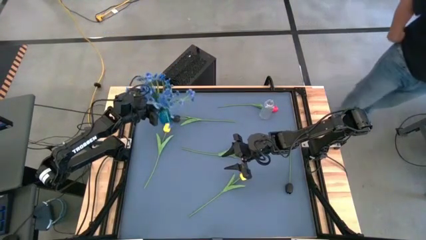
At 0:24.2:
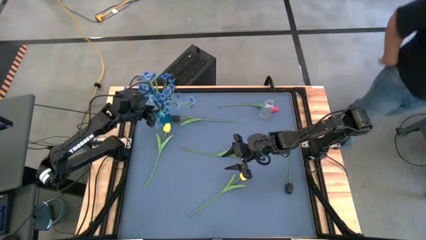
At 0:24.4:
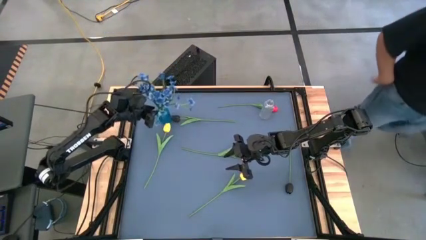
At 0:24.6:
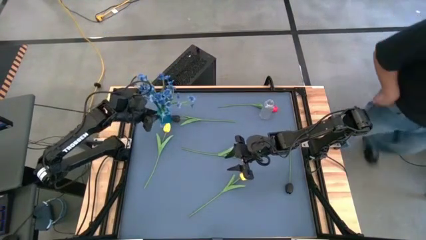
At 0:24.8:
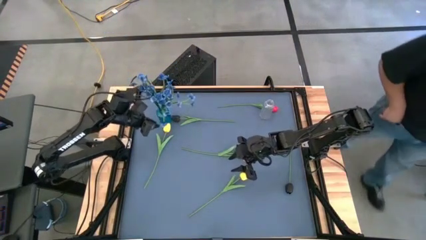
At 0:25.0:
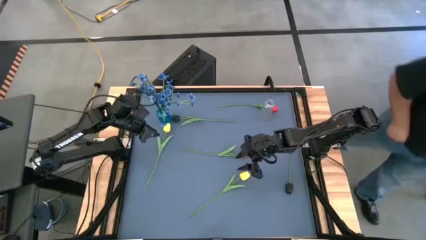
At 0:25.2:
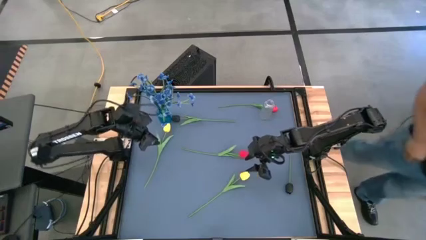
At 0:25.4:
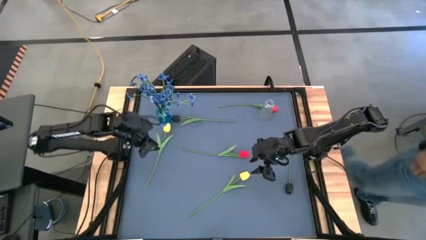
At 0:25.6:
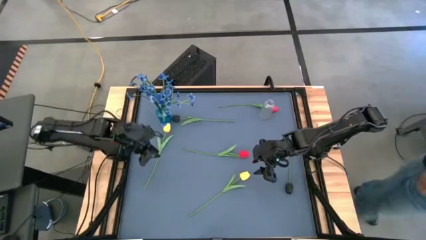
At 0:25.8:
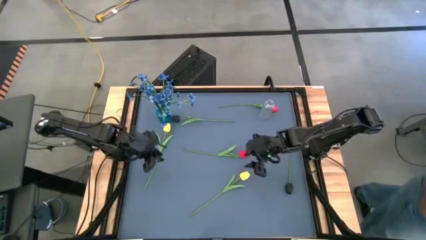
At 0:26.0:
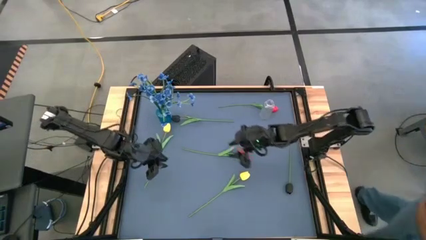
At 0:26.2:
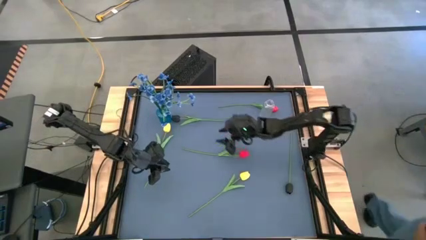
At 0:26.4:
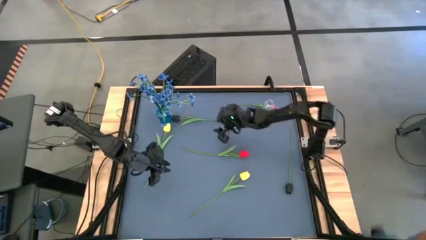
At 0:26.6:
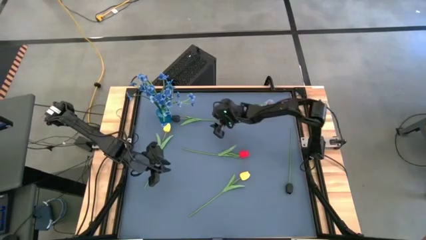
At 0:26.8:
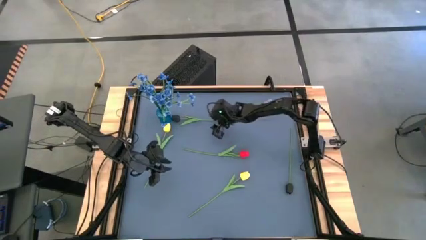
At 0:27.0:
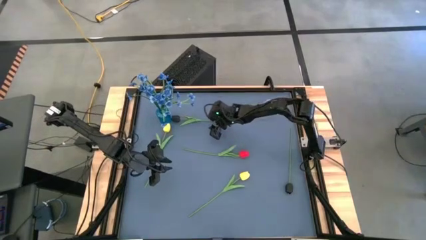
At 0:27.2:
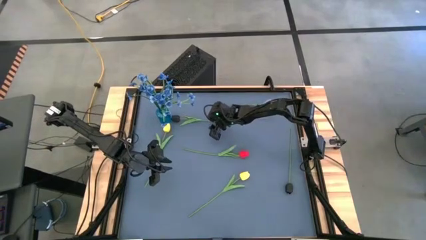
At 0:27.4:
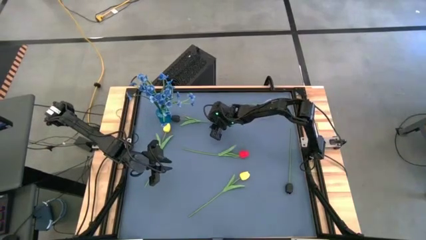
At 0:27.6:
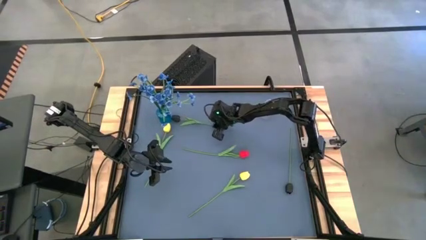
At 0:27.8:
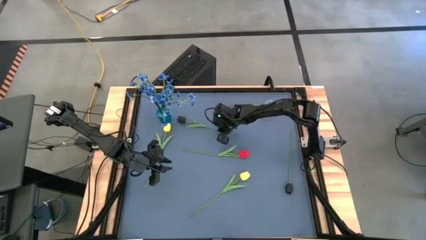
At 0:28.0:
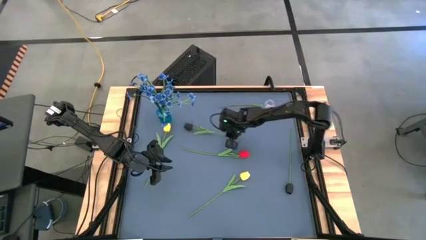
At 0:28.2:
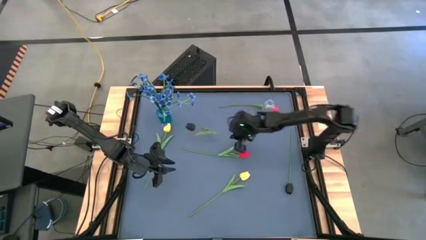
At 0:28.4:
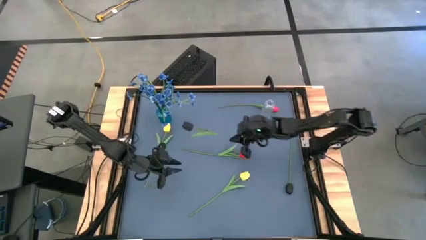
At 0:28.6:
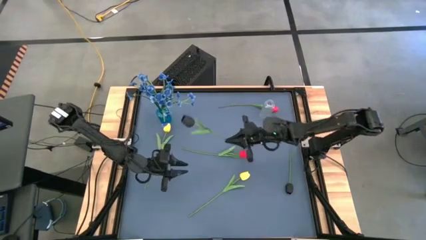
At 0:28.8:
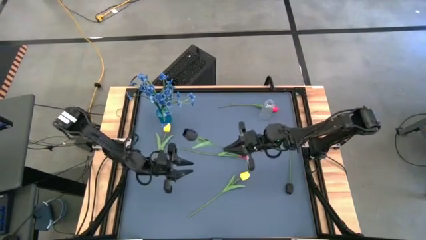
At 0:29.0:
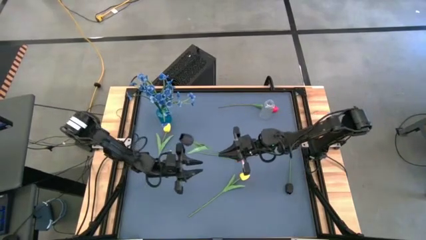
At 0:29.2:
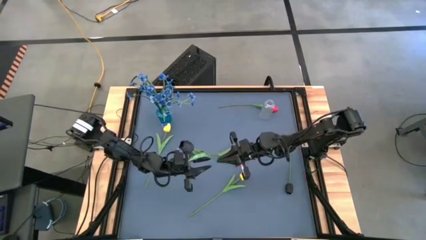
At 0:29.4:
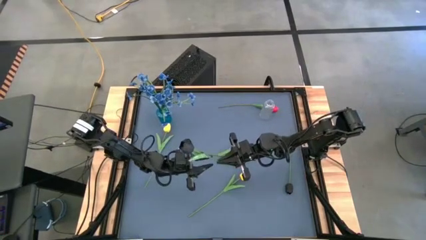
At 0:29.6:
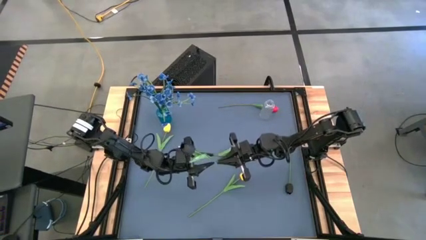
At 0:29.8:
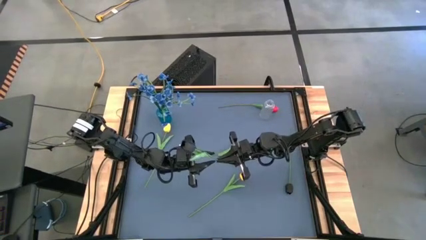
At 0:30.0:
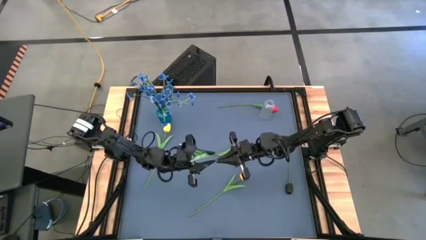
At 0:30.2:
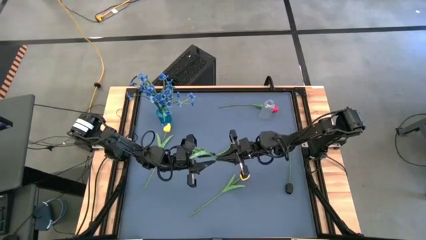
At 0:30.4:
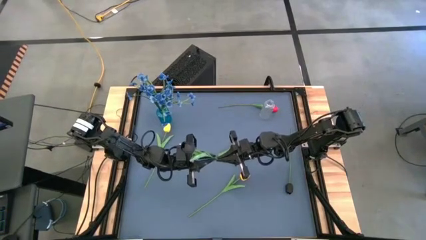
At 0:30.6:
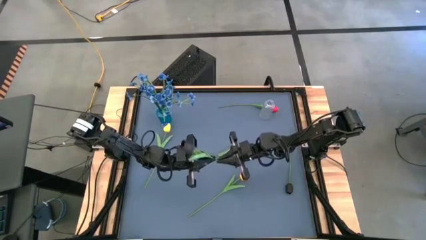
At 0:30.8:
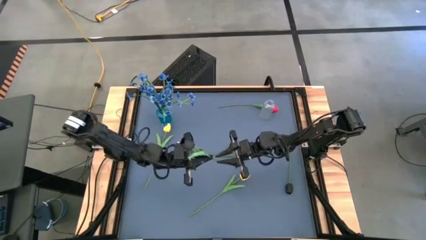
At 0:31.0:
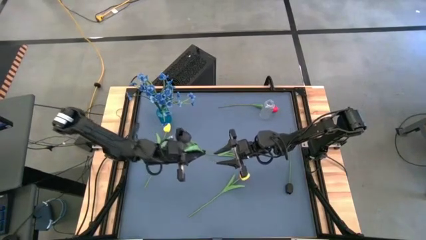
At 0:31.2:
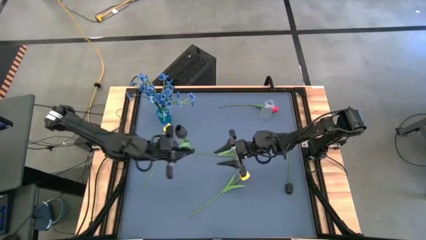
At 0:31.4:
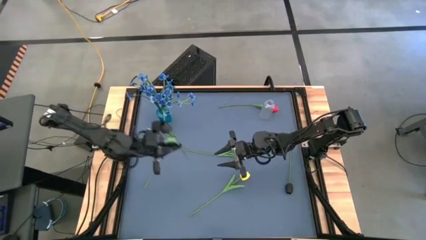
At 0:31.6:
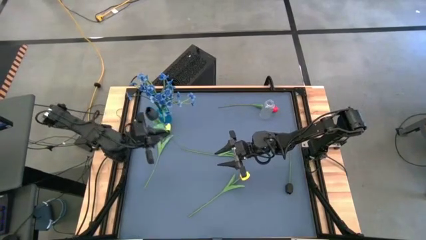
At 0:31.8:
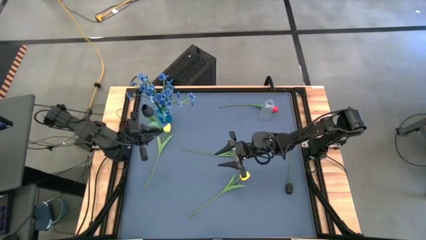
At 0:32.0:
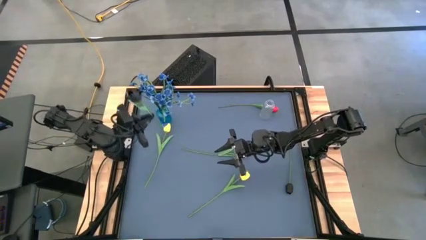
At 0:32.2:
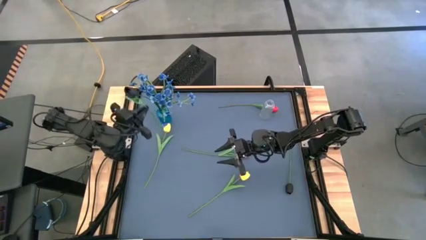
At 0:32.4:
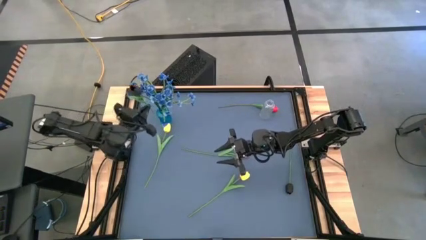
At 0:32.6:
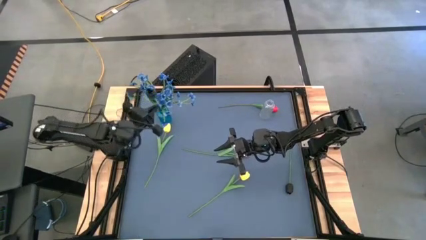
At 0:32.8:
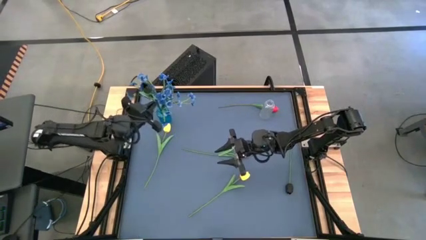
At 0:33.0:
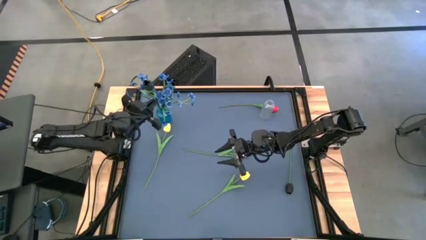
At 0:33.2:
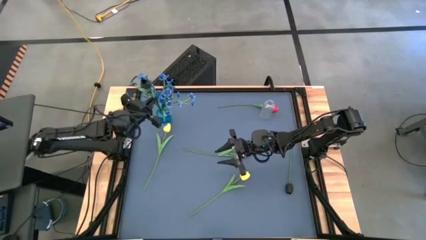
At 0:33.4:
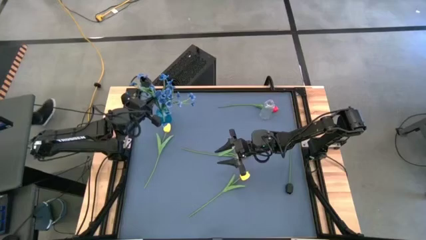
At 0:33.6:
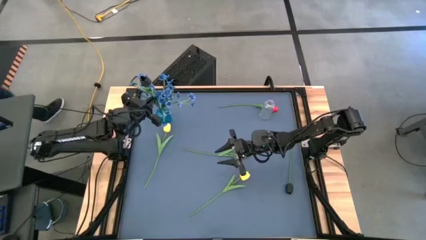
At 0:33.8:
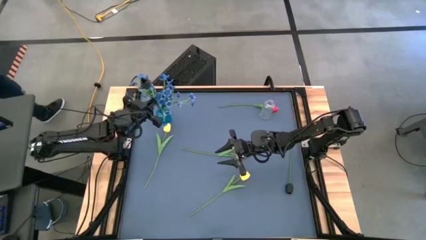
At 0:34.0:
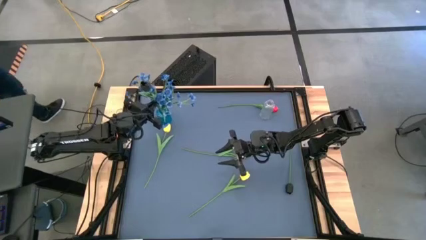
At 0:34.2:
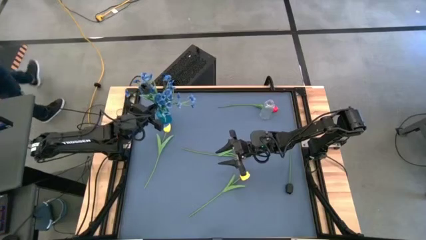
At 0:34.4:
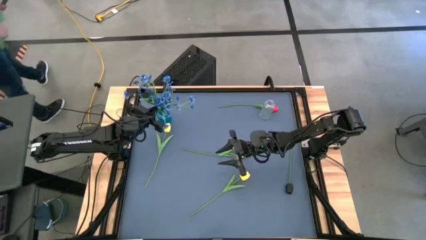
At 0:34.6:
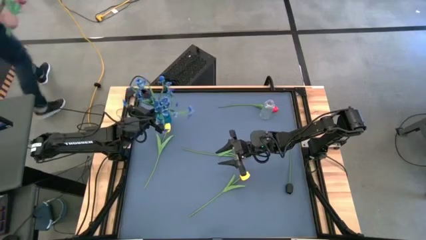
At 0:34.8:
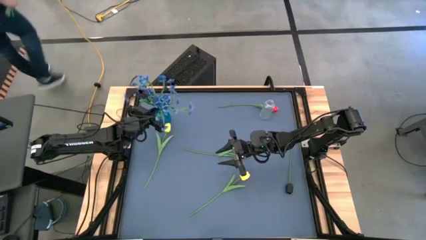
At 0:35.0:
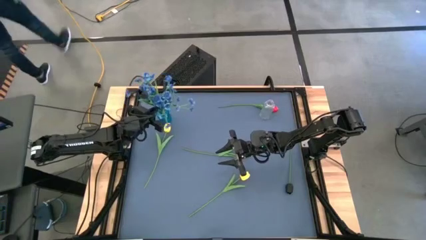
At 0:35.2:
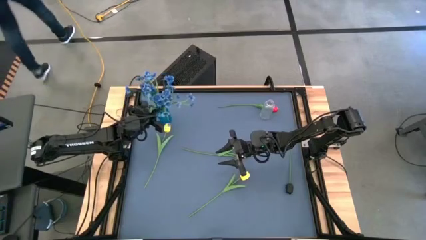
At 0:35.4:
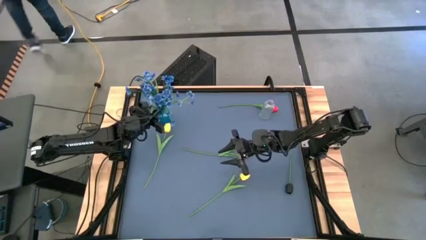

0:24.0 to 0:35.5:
Task: Sort flowers into vase by color
Put the left black tulip into the blue vase
